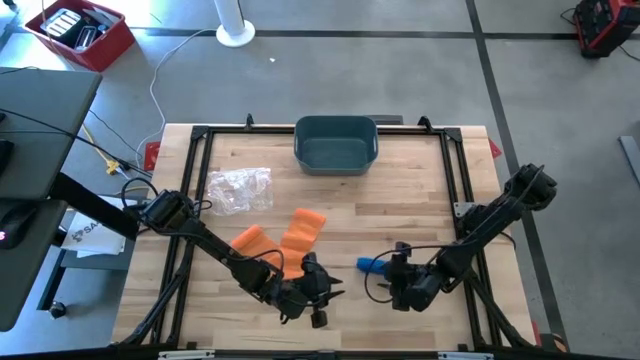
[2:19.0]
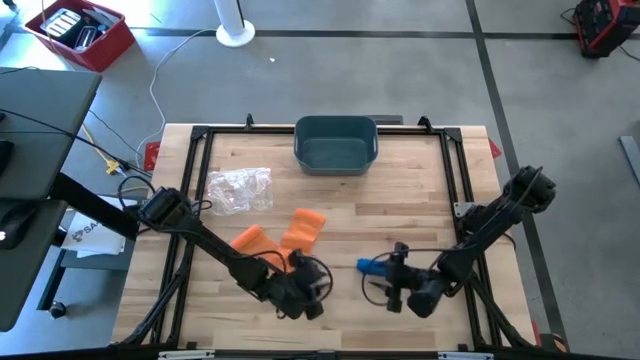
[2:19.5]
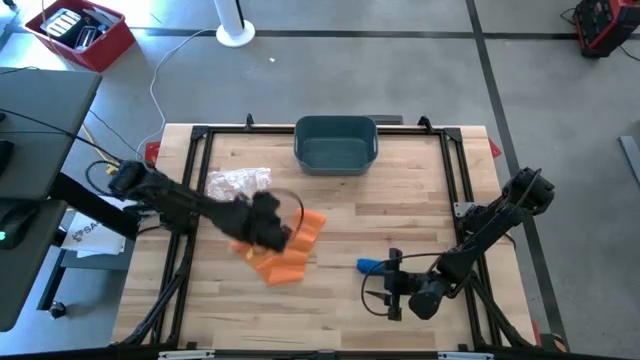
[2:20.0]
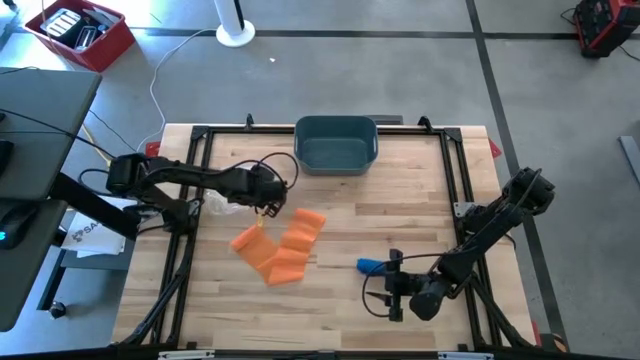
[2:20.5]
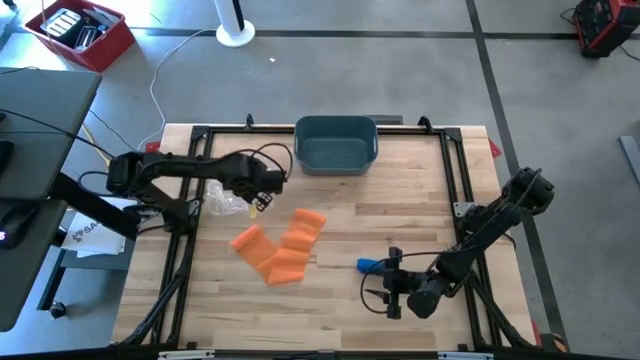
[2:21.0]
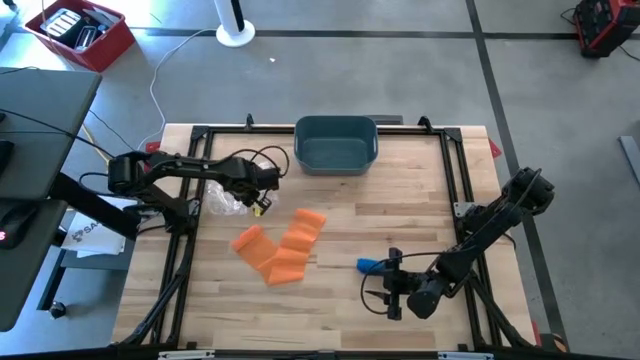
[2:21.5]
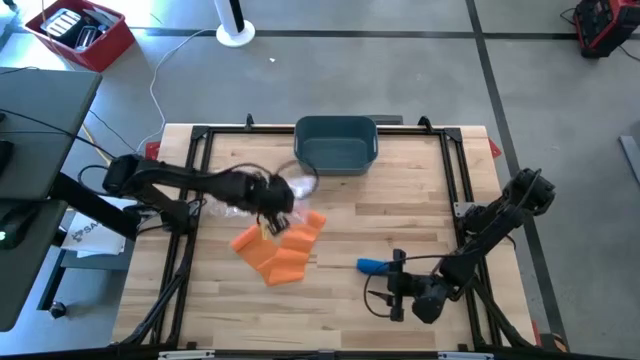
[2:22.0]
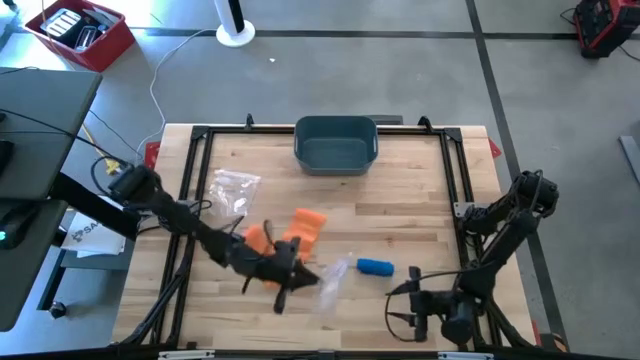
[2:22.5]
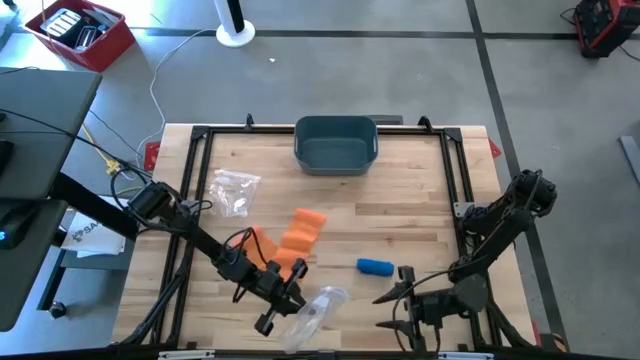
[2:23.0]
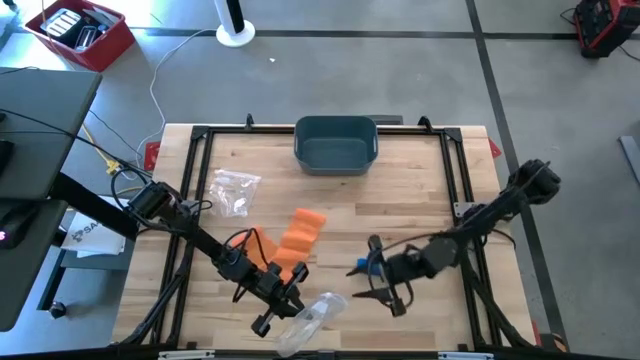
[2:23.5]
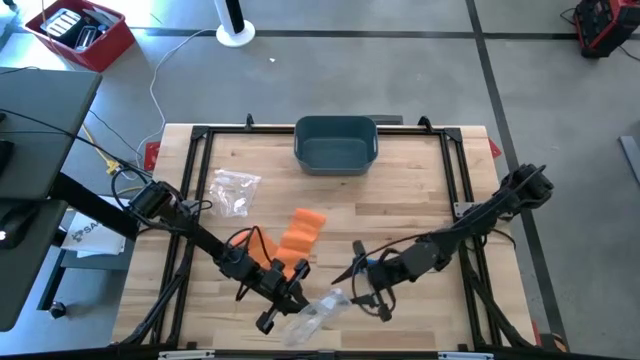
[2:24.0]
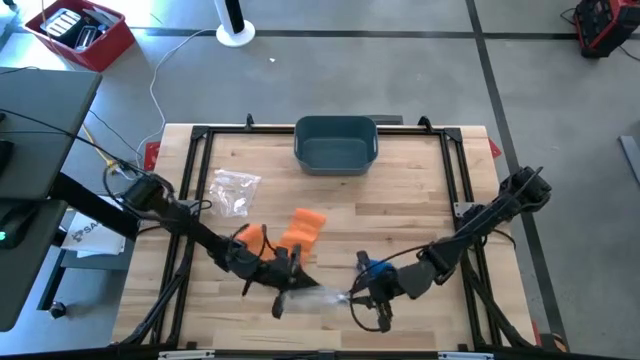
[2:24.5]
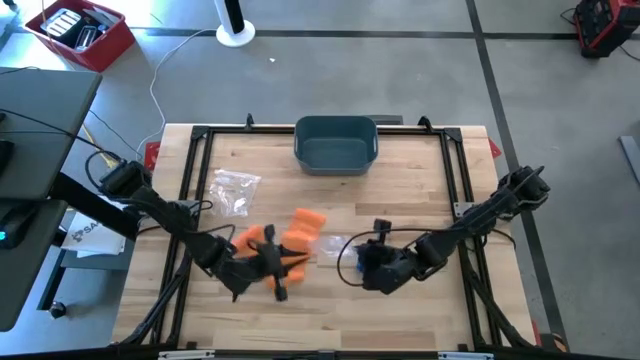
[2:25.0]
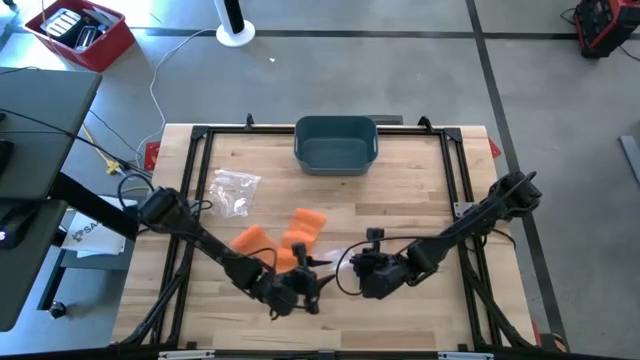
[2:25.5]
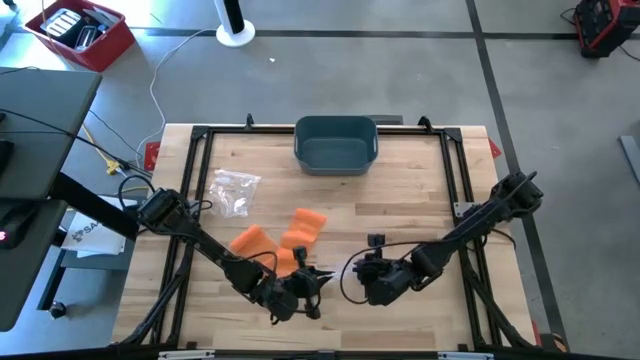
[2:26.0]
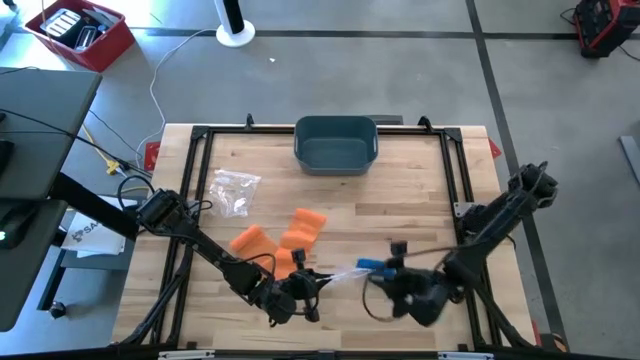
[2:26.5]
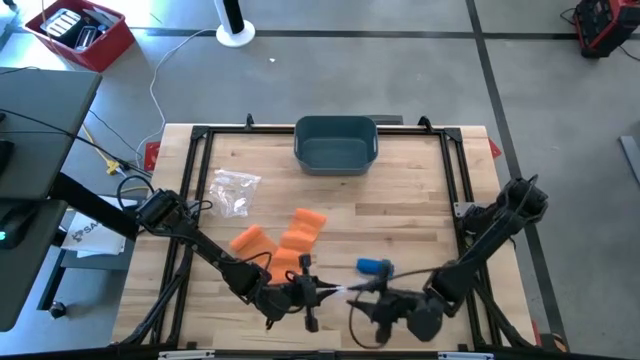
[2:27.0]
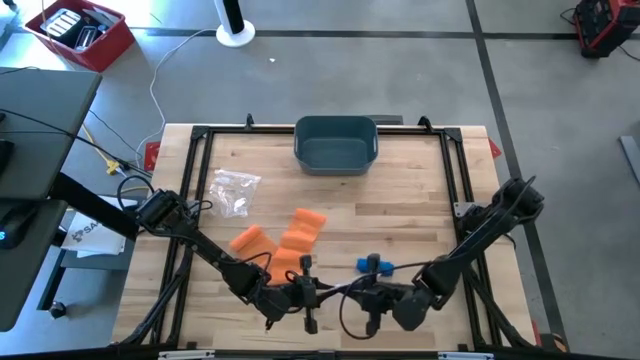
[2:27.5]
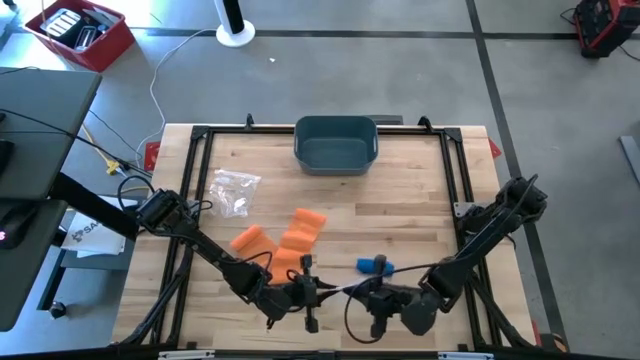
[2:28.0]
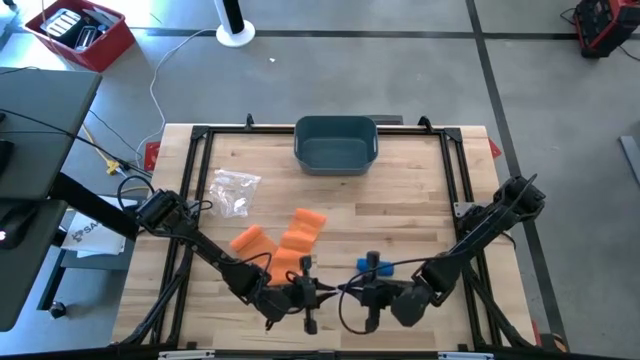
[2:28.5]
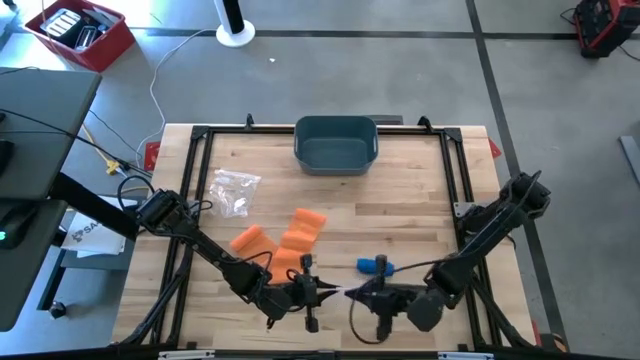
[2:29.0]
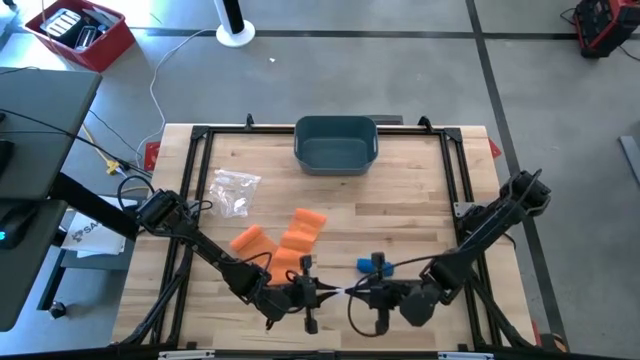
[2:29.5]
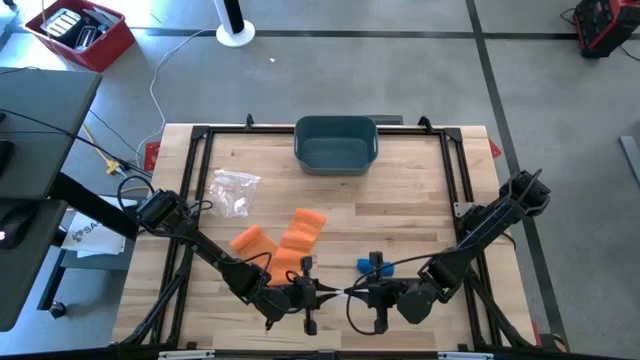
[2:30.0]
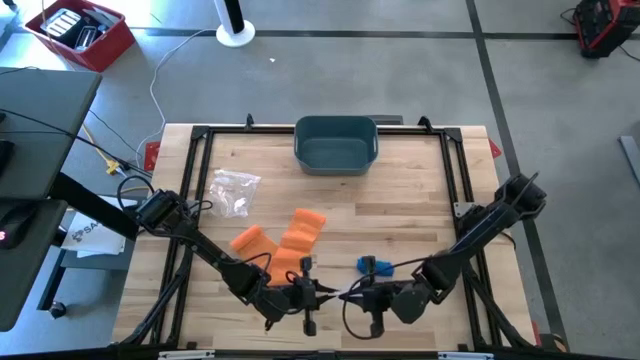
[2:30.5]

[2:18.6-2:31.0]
Task: Roll bandage
Put the rolled blue bandage into the right transparent zip bag

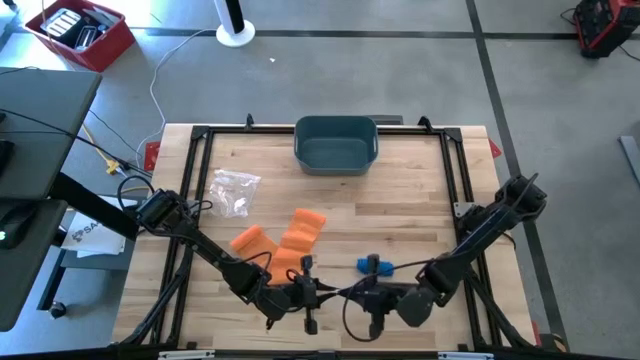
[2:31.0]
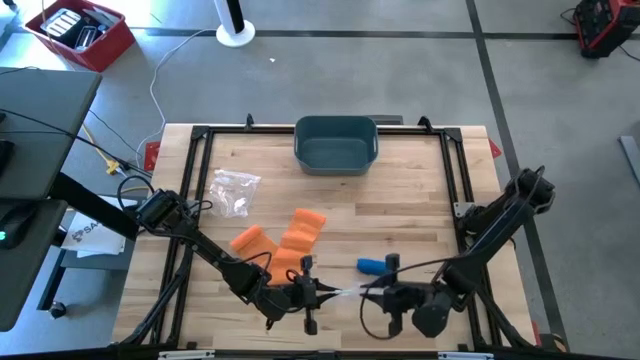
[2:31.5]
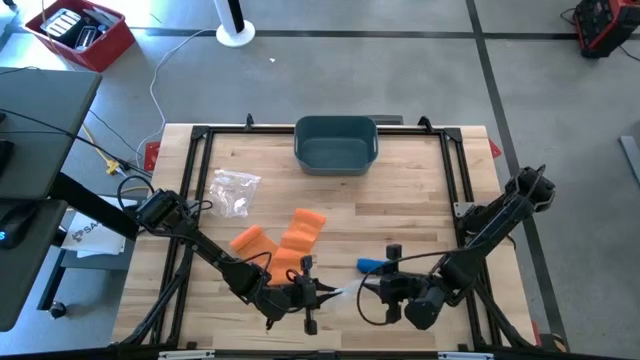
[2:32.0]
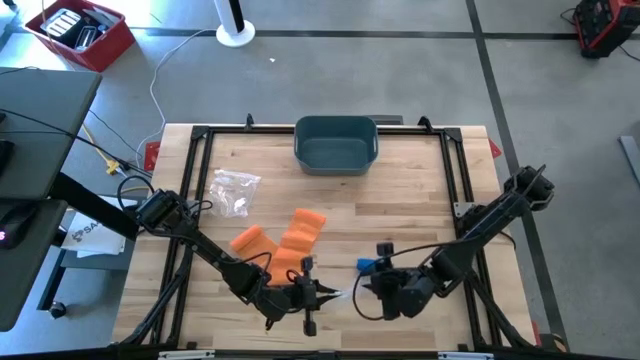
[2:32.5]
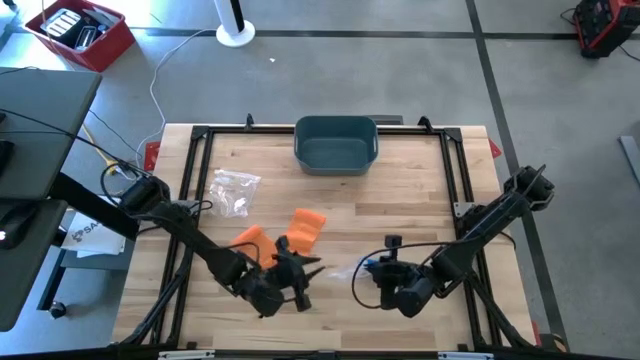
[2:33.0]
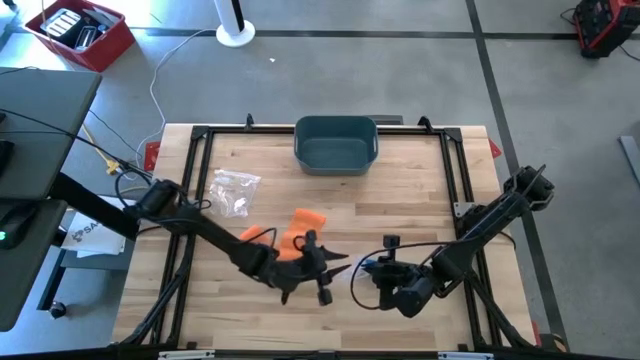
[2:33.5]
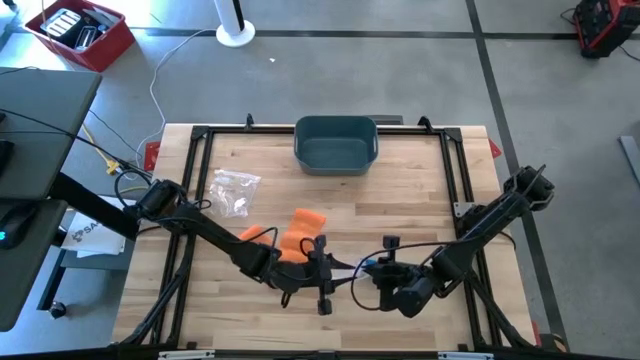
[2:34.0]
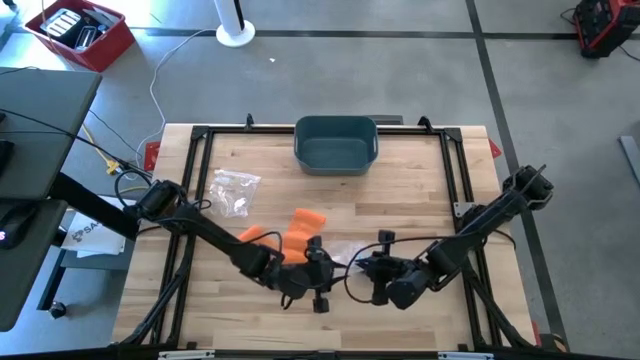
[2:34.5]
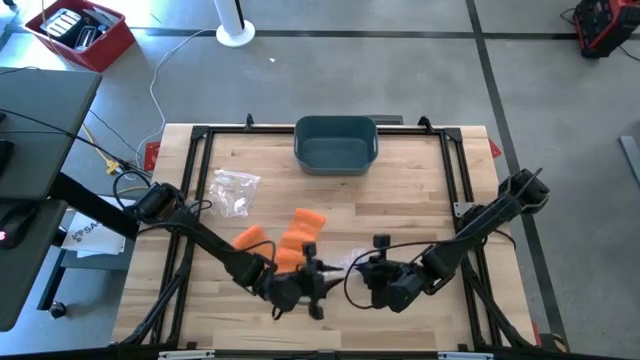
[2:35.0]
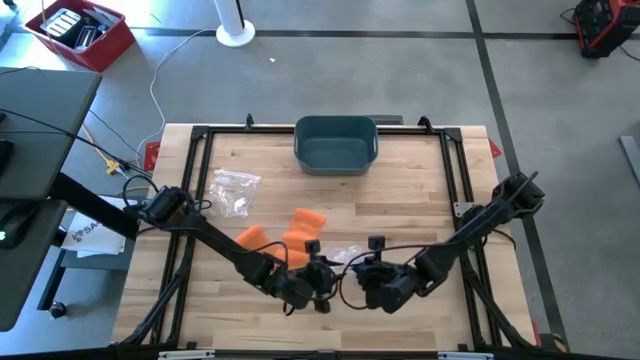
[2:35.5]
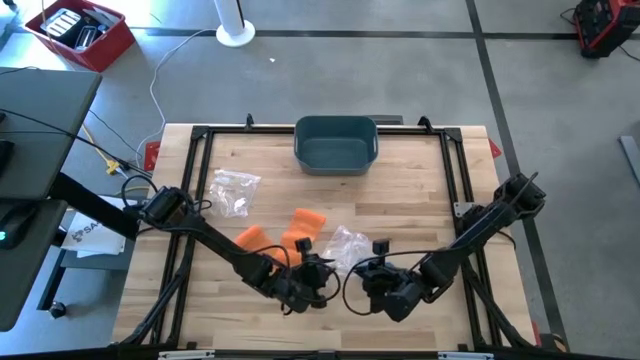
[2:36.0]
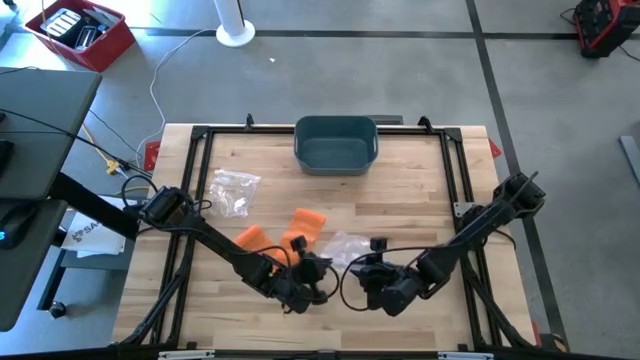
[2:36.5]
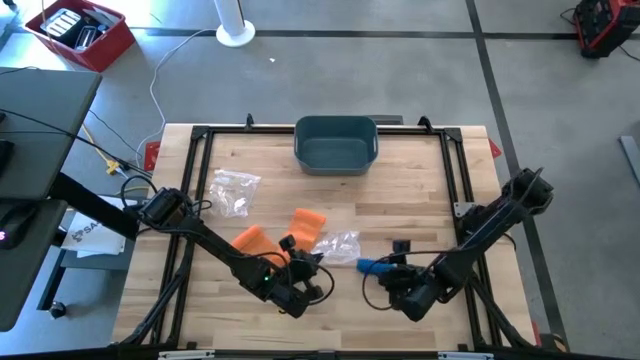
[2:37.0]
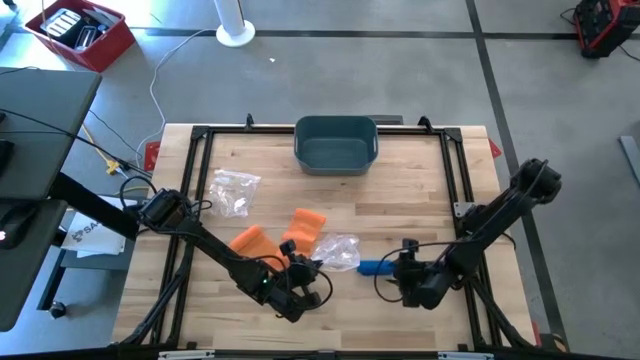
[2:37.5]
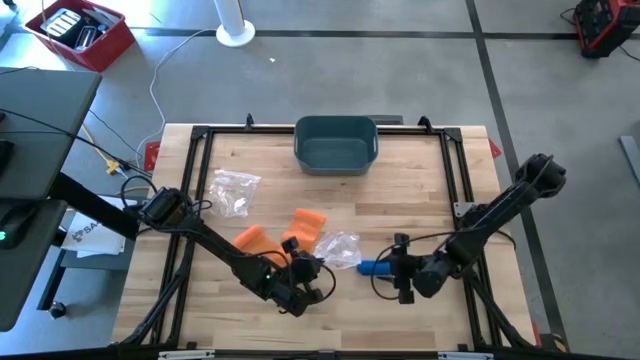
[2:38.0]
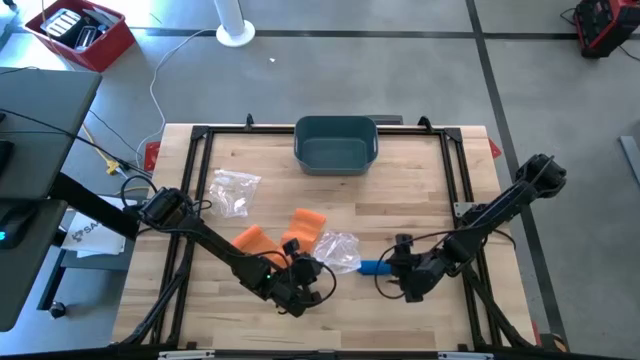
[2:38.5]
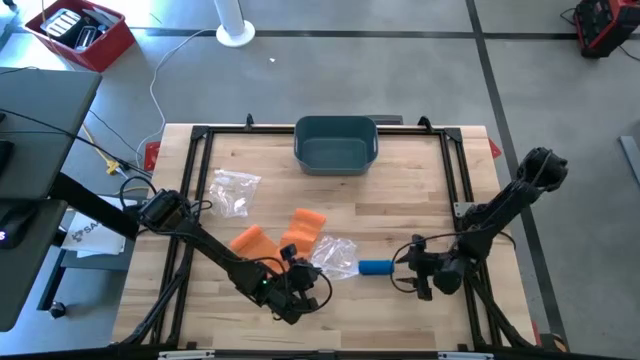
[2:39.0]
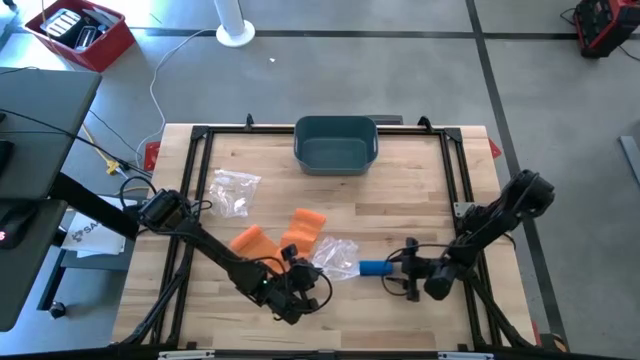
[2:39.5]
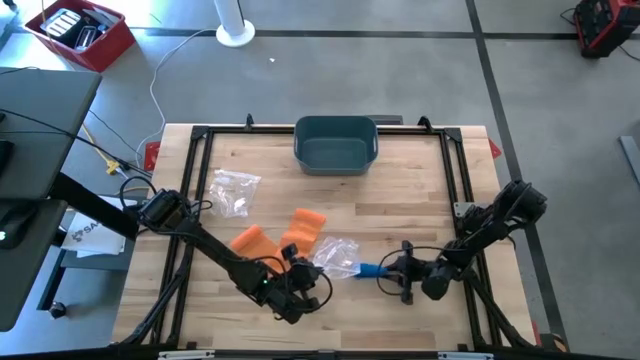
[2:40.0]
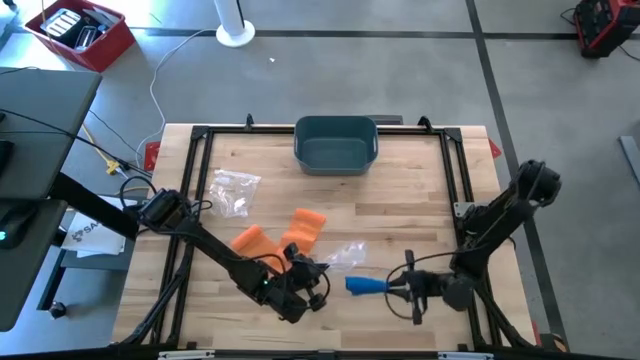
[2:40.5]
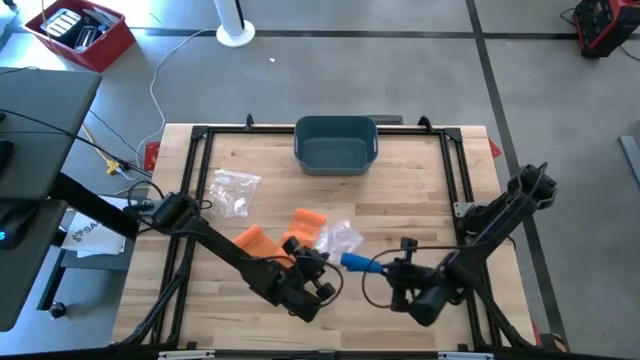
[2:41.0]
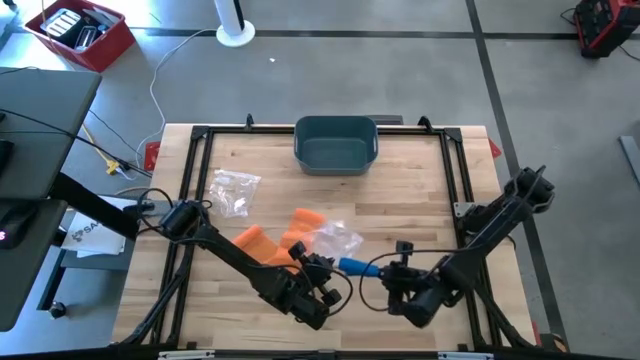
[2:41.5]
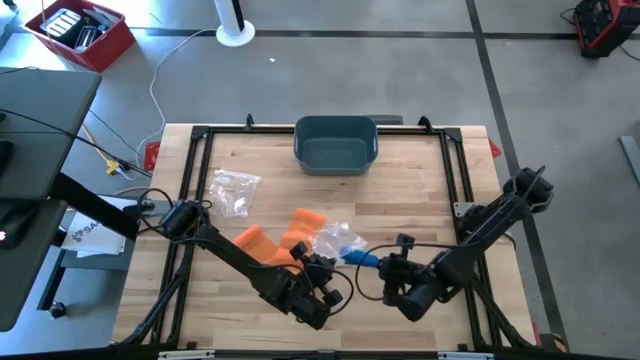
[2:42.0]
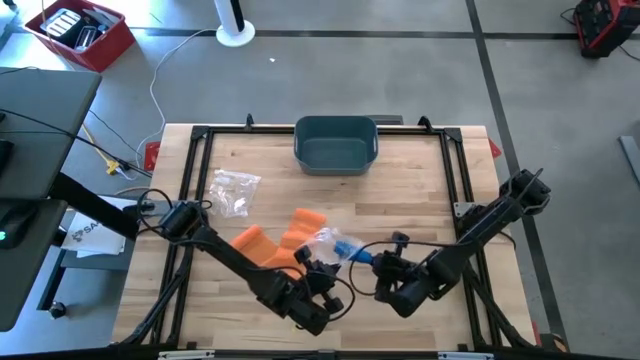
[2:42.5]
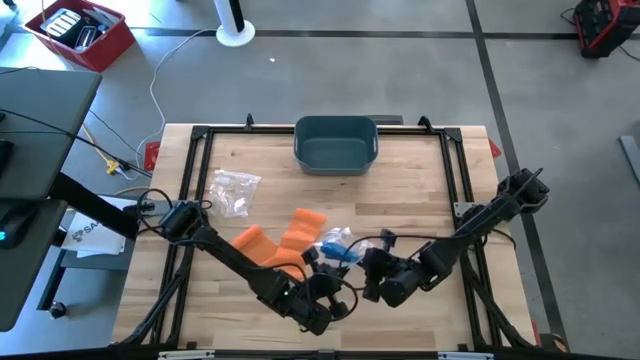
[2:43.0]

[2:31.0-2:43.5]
Put the rolled blue bandage into the right transparent zip bag
